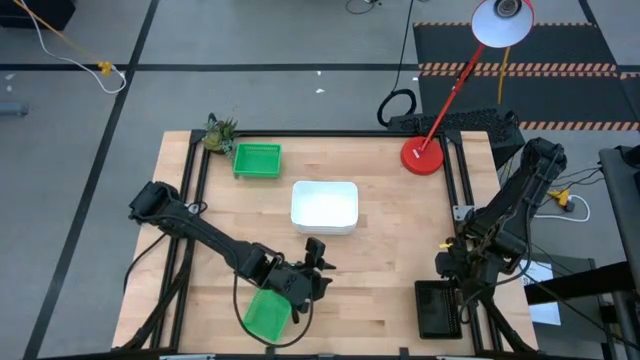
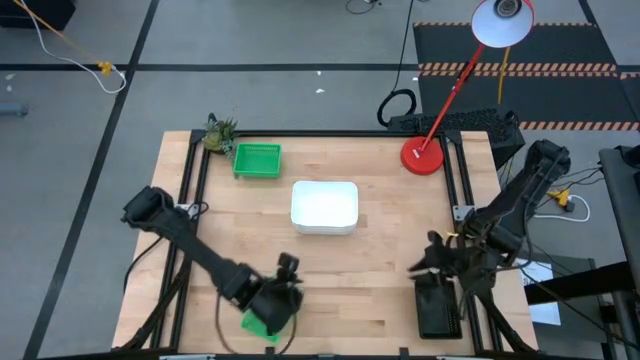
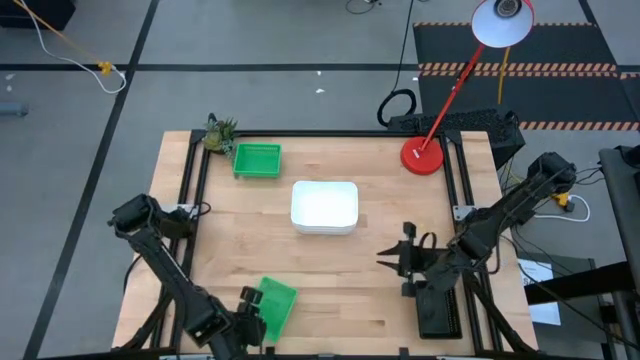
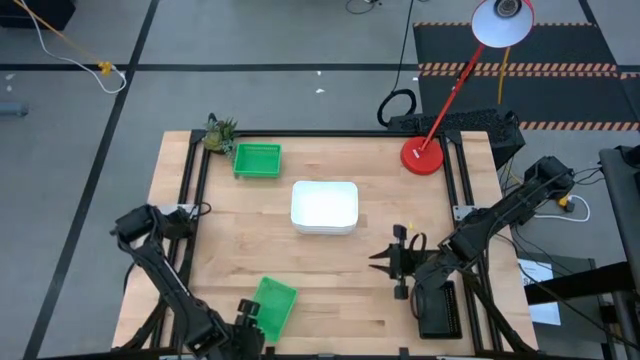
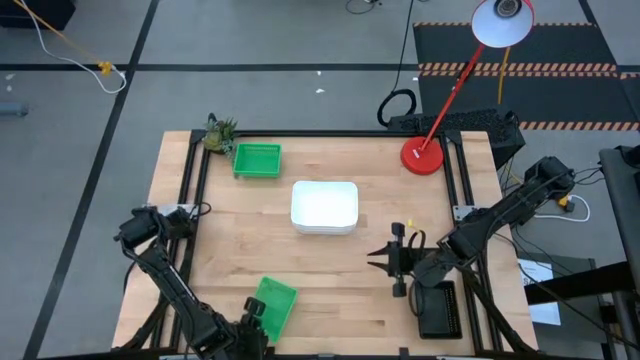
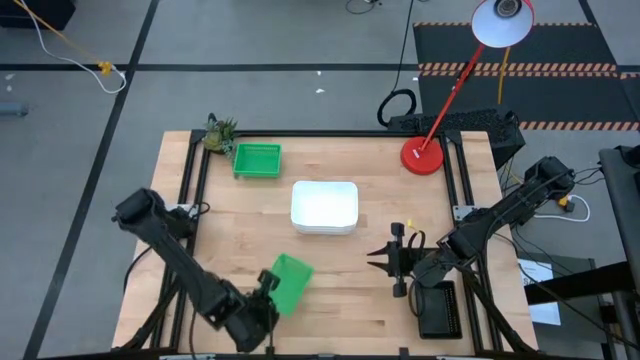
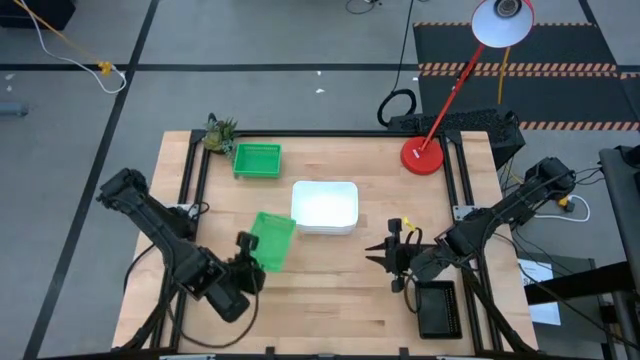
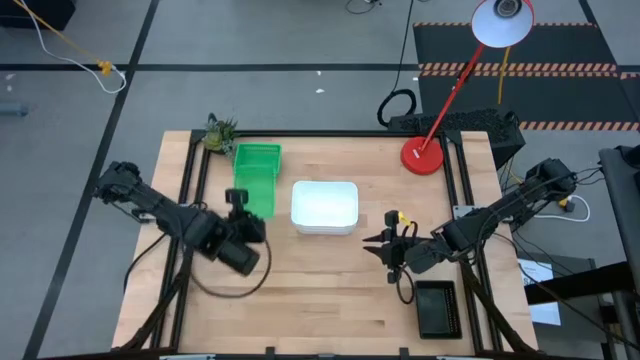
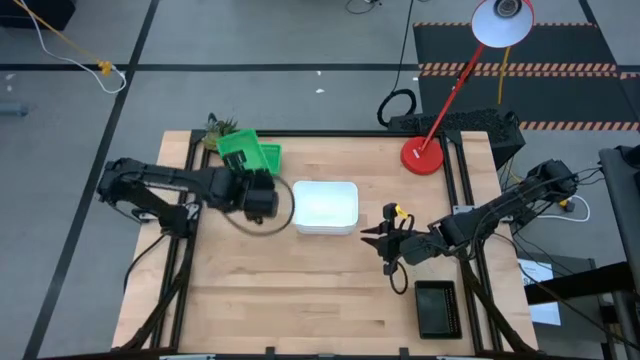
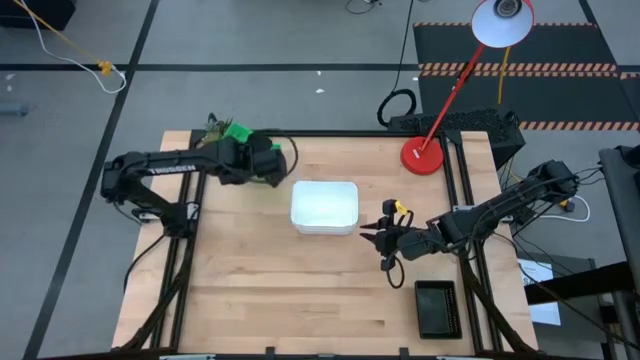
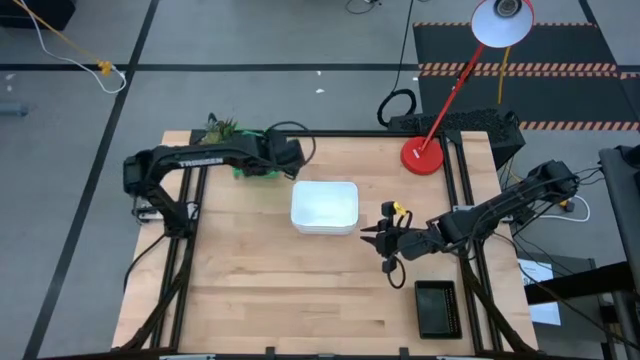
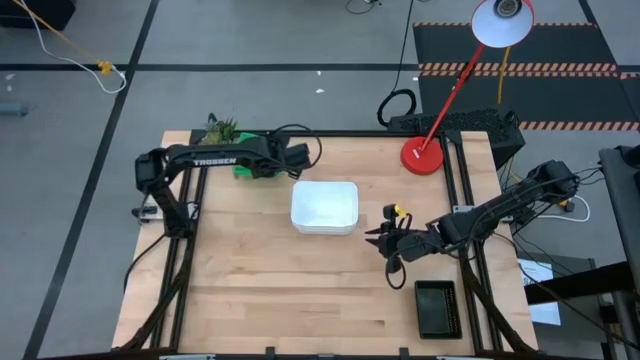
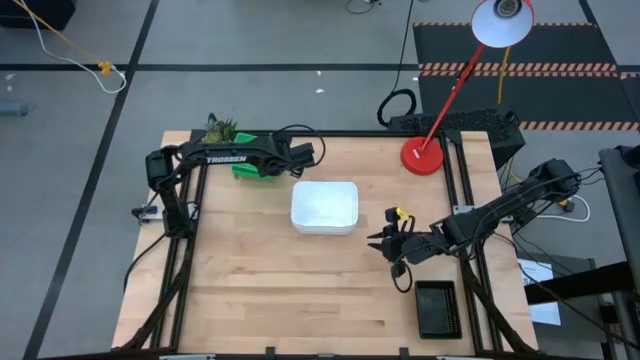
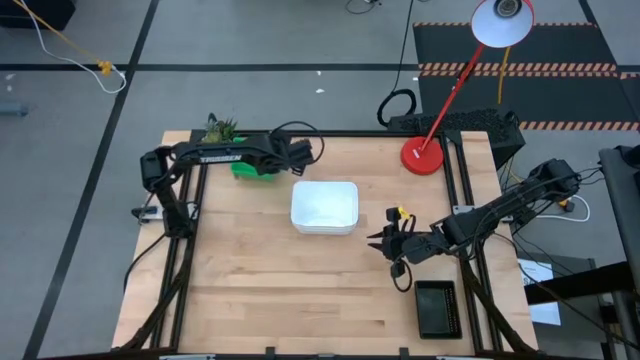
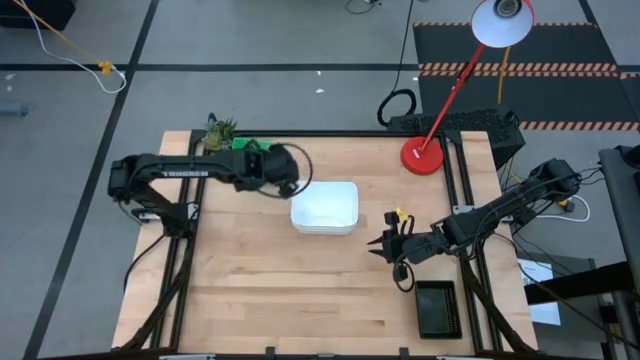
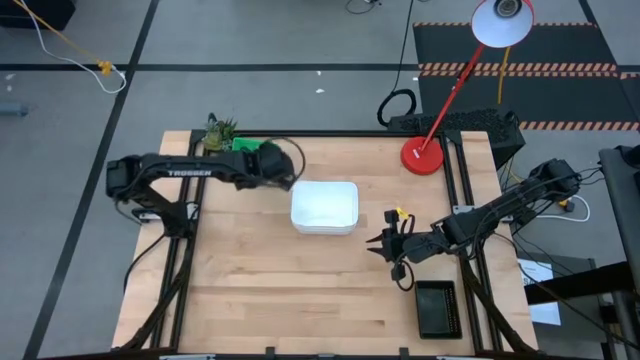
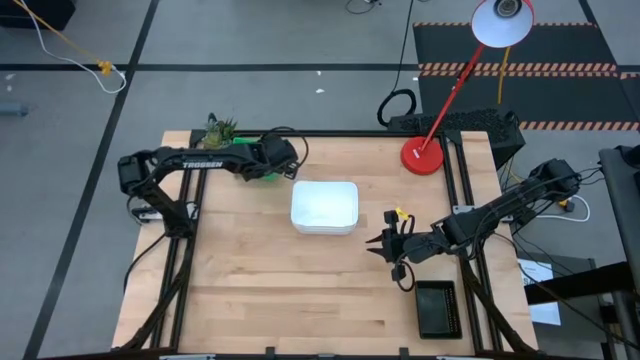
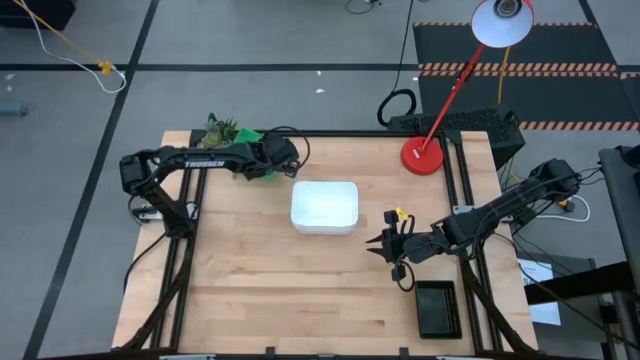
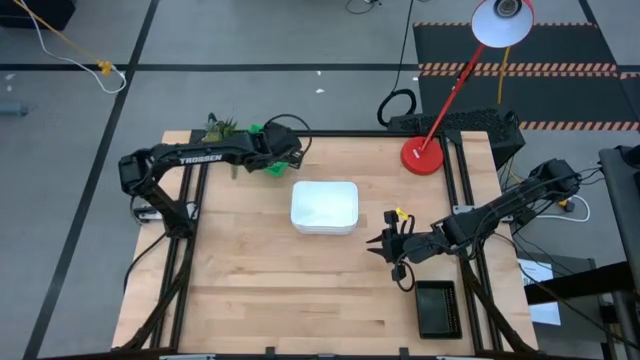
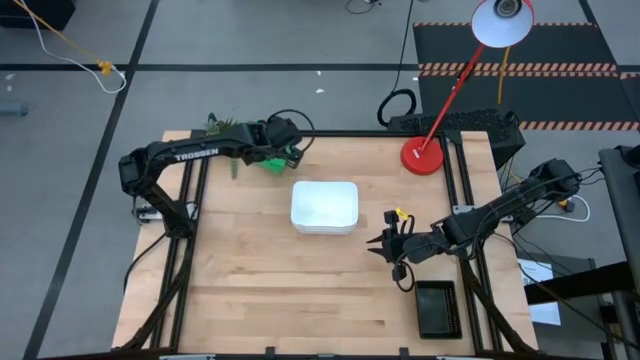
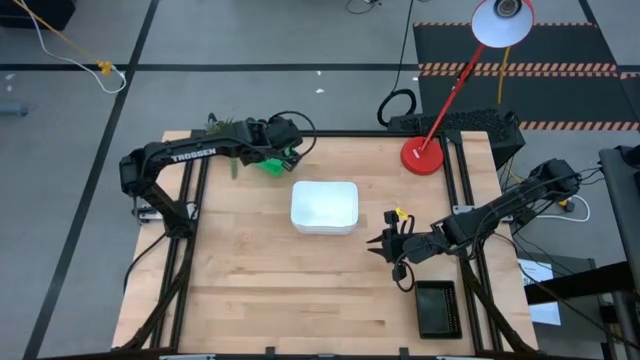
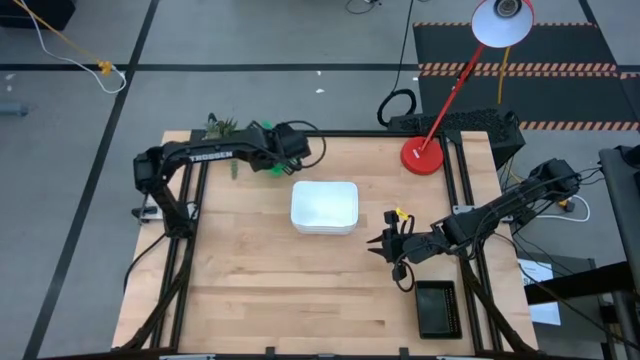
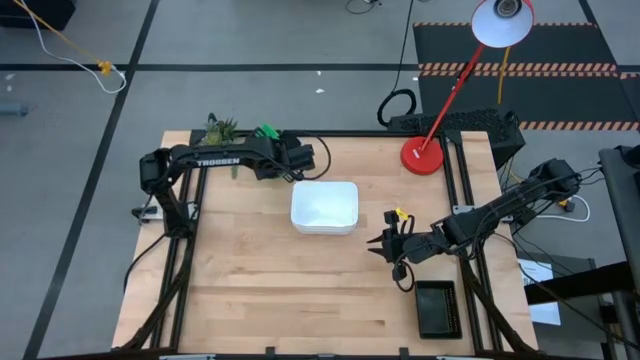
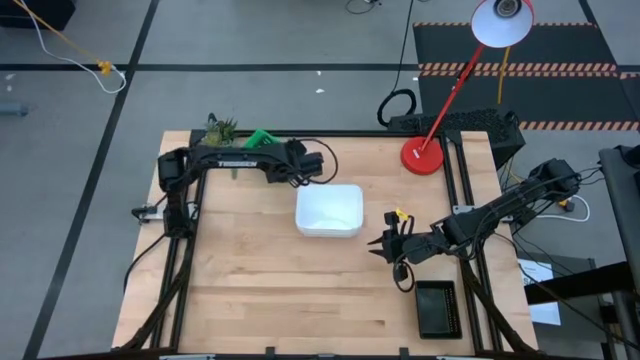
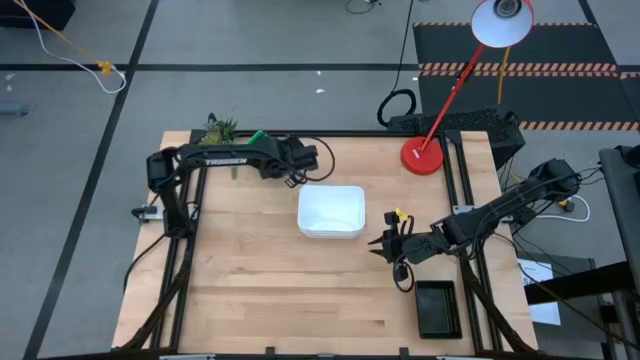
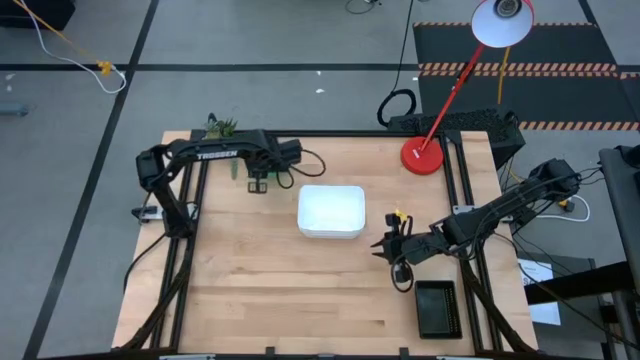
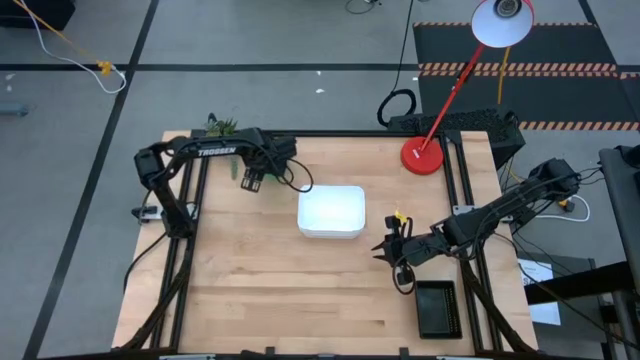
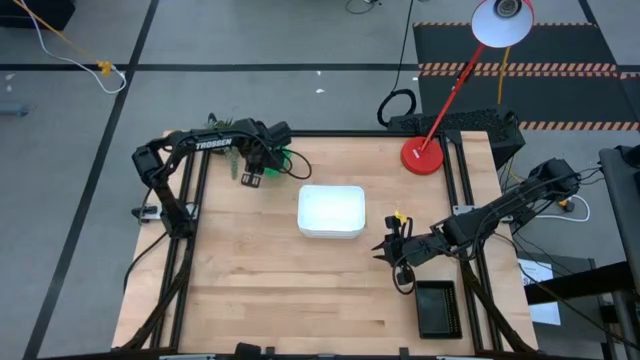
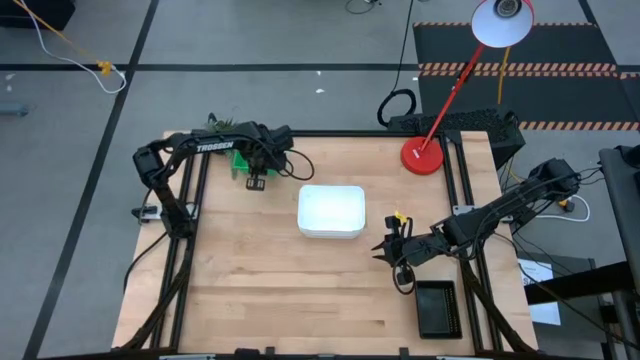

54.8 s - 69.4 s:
Stack the bottom green bin on top of the top green bins
